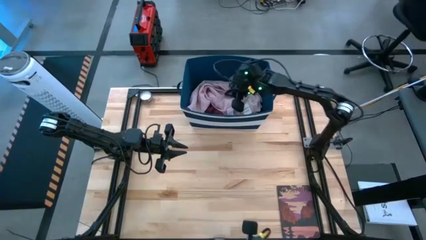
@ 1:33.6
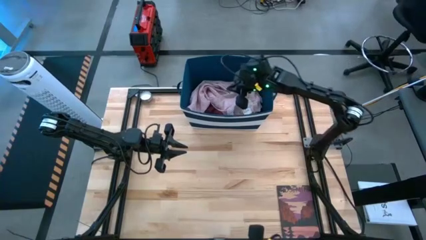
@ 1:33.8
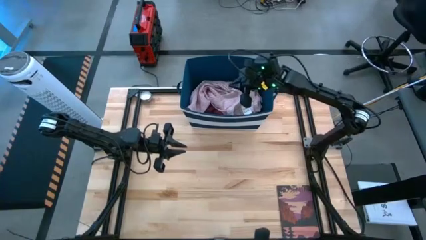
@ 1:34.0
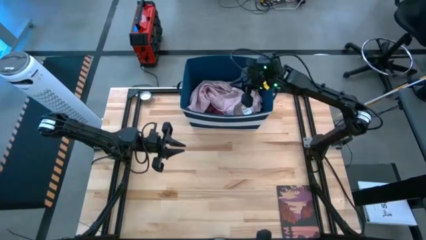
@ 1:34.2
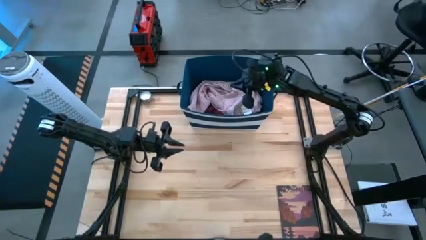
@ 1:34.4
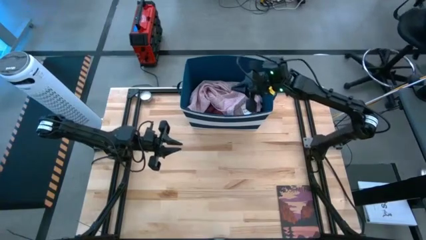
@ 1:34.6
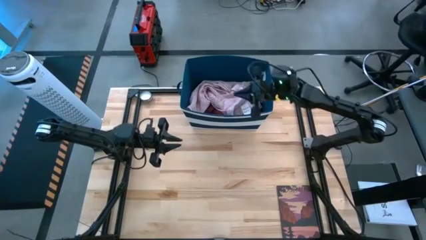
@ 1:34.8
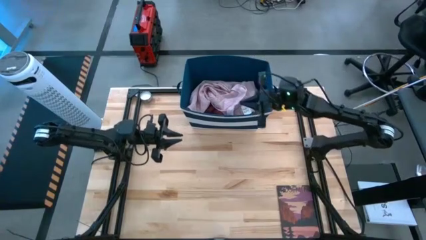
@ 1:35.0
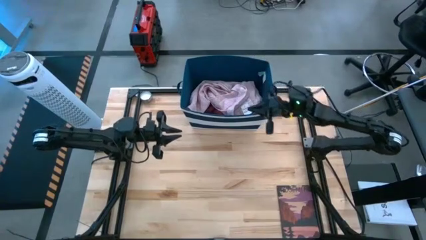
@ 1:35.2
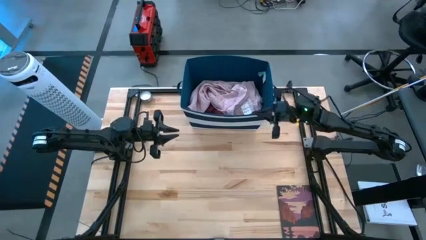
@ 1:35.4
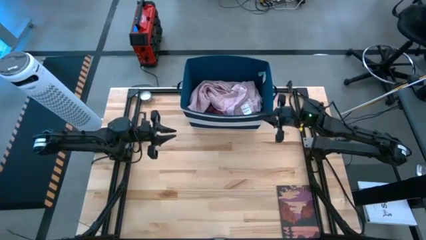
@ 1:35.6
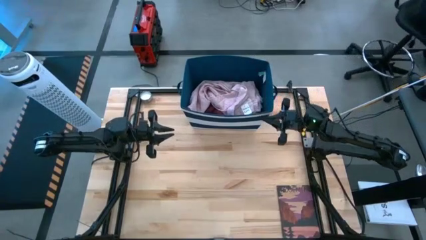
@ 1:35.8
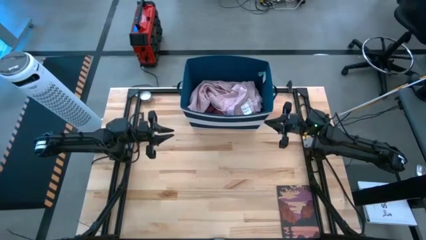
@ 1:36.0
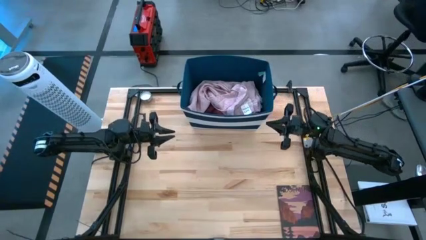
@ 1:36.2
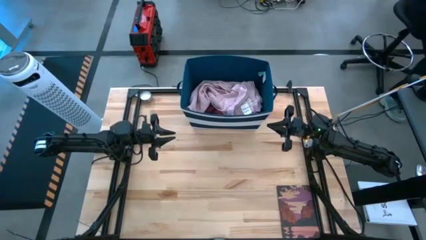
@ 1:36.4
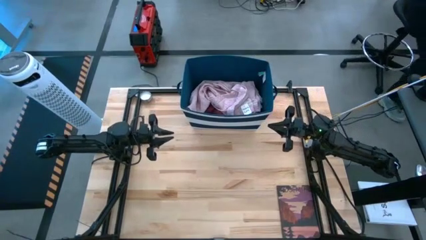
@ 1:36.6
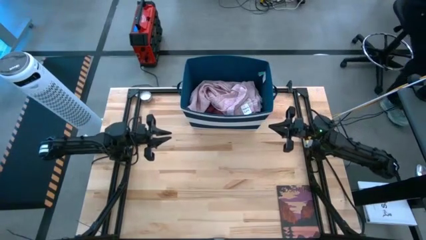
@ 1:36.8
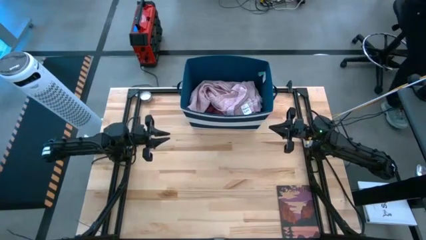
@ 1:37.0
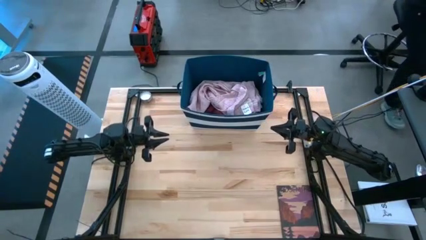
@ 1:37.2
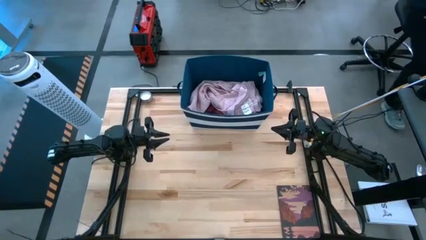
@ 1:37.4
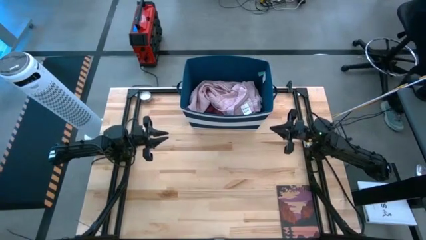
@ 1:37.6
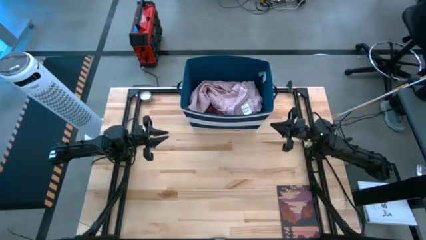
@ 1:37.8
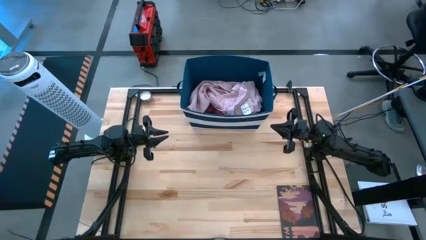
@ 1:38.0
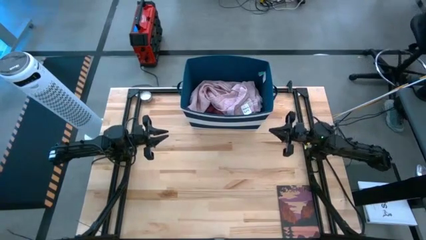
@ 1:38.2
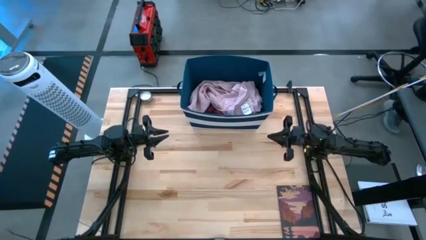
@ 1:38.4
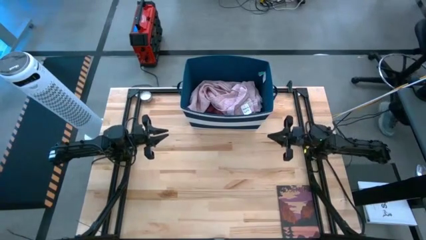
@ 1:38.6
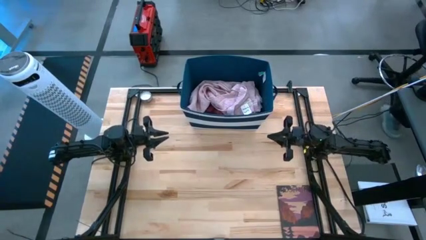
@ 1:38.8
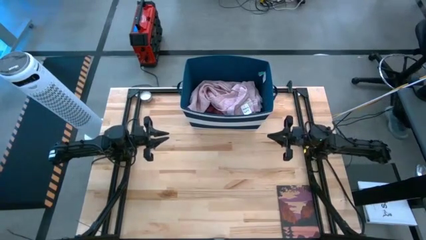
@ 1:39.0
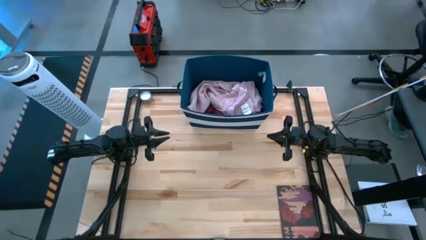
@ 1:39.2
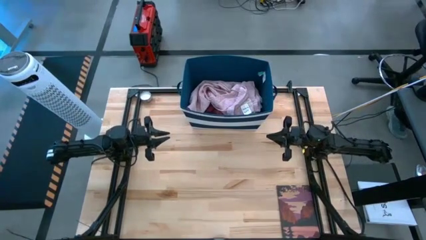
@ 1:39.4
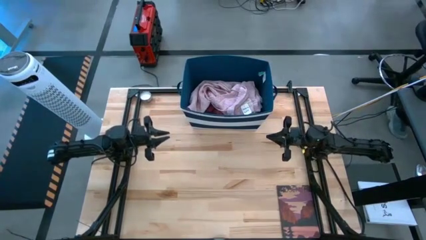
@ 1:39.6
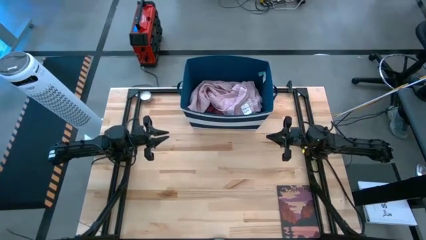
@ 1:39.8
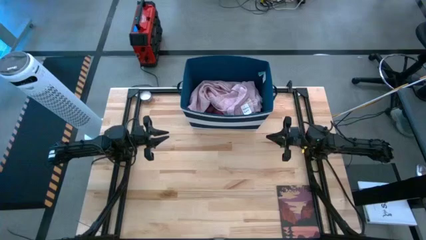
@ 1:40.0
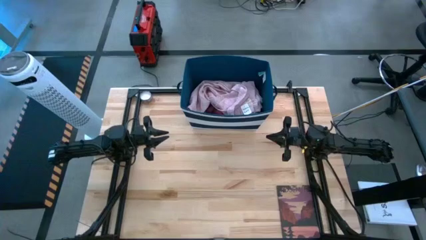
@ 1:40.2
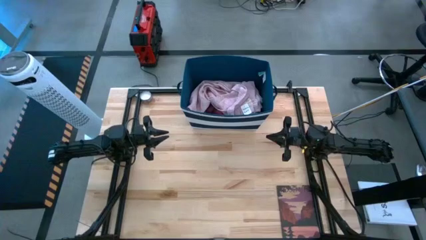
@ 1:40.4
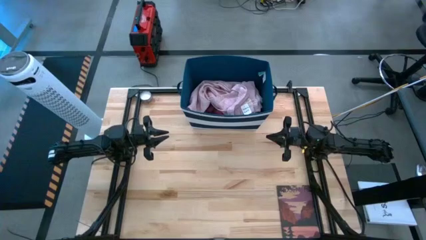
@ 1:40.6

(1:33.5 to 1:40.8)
Task: Sort clothes
Return to Home Position

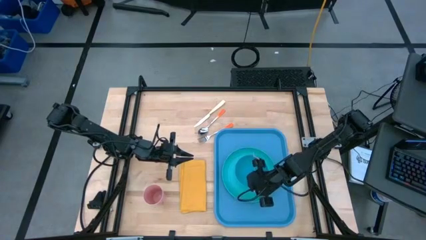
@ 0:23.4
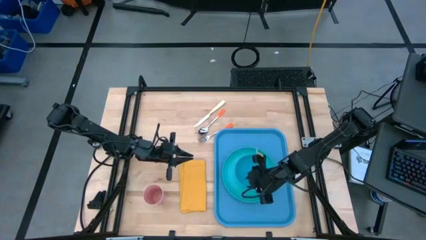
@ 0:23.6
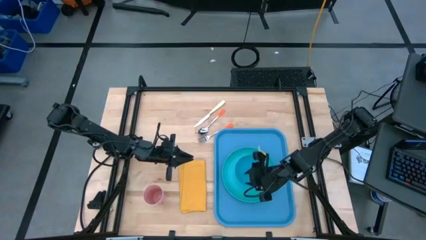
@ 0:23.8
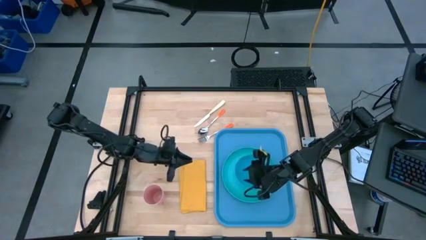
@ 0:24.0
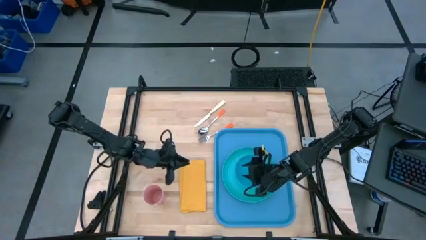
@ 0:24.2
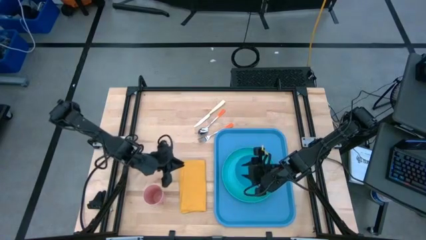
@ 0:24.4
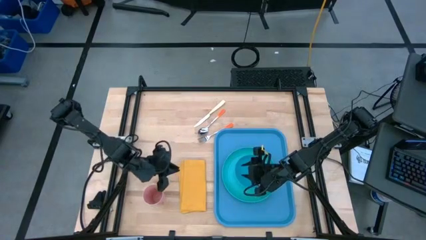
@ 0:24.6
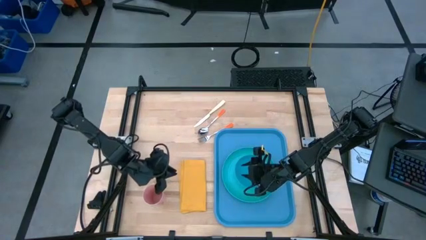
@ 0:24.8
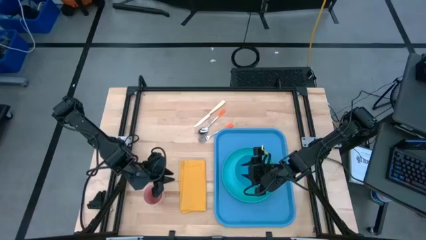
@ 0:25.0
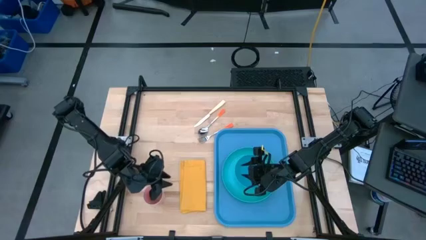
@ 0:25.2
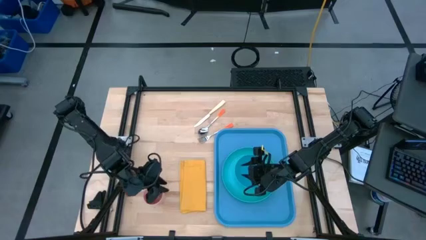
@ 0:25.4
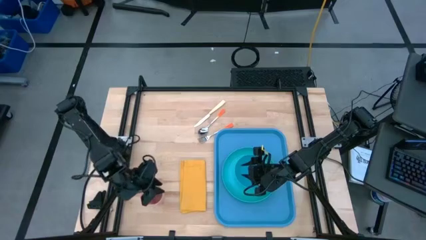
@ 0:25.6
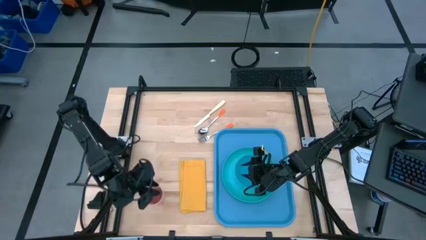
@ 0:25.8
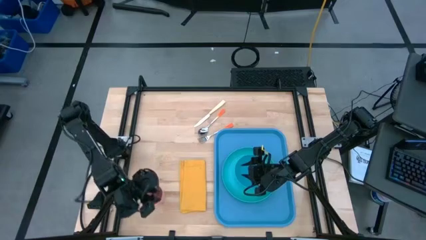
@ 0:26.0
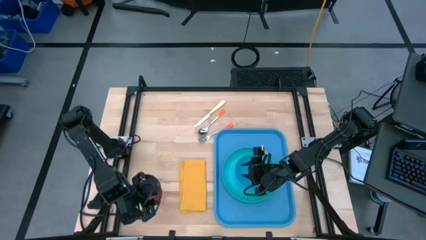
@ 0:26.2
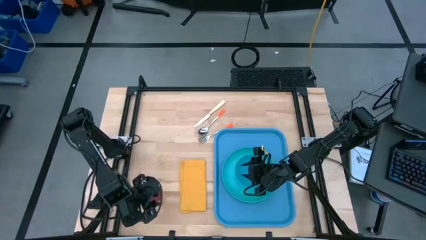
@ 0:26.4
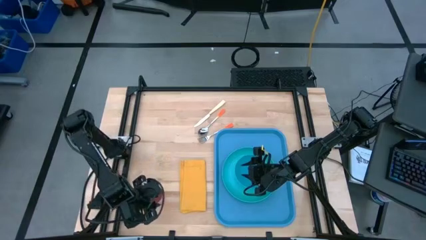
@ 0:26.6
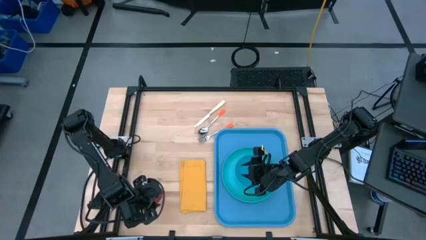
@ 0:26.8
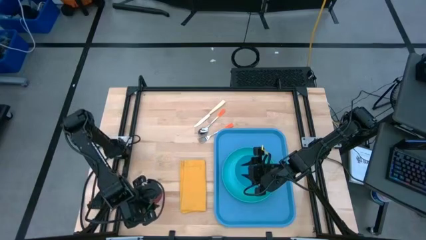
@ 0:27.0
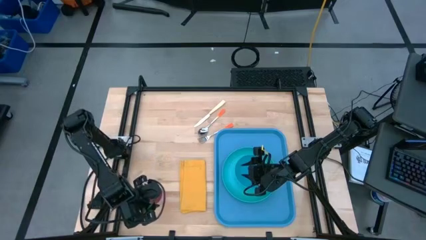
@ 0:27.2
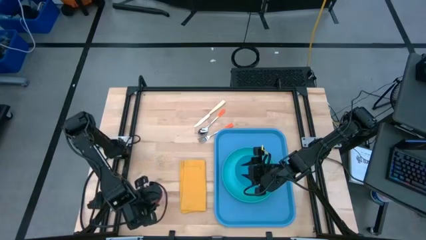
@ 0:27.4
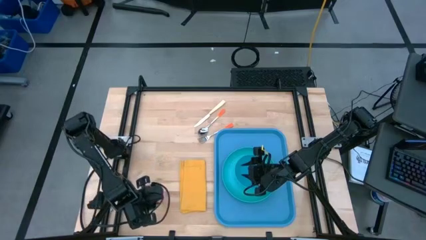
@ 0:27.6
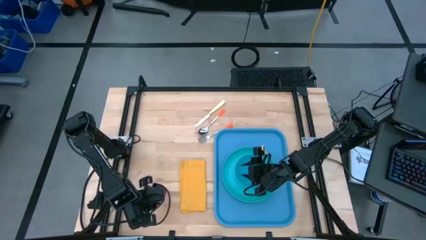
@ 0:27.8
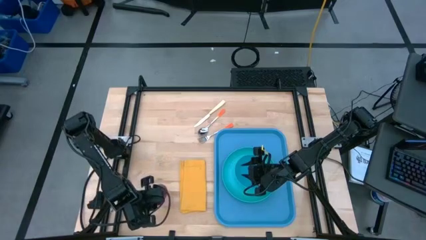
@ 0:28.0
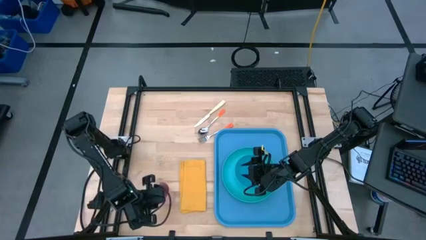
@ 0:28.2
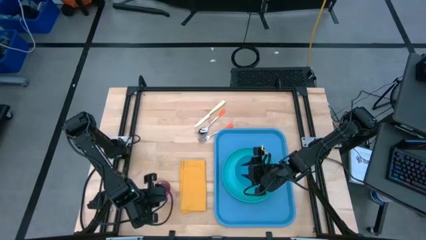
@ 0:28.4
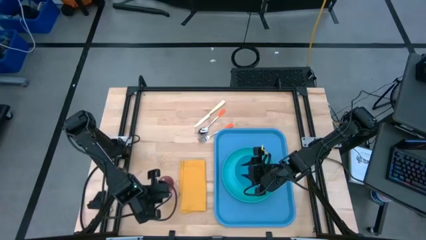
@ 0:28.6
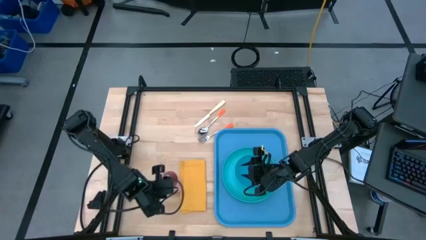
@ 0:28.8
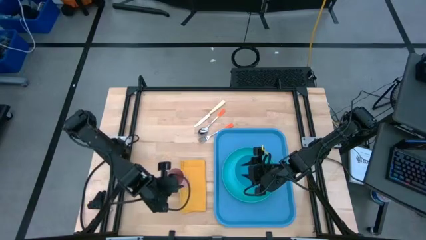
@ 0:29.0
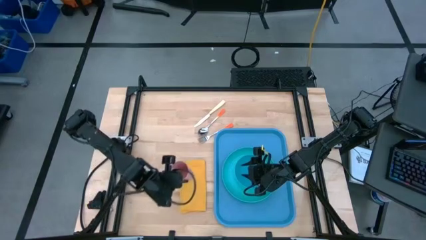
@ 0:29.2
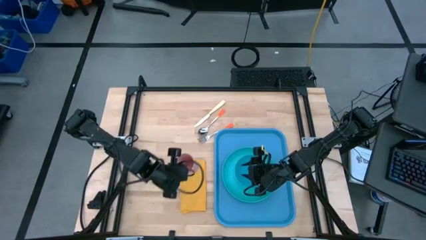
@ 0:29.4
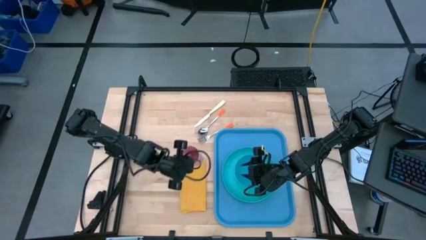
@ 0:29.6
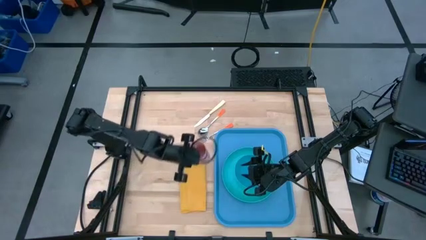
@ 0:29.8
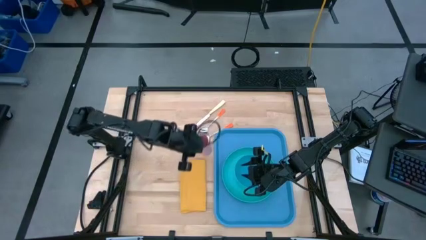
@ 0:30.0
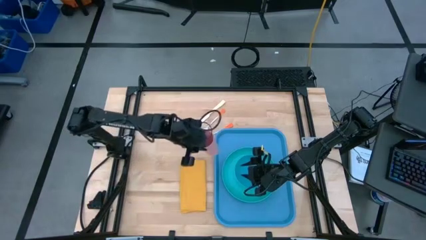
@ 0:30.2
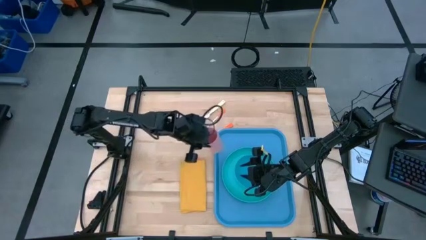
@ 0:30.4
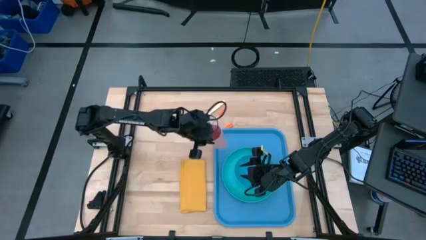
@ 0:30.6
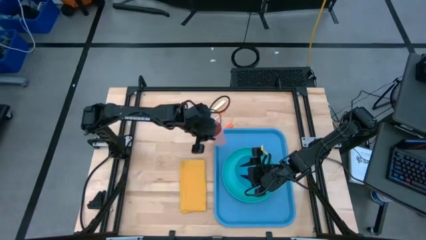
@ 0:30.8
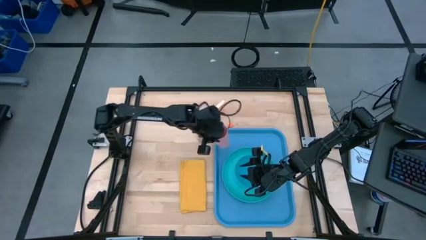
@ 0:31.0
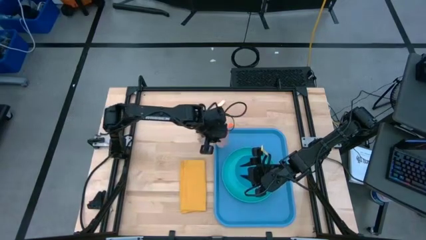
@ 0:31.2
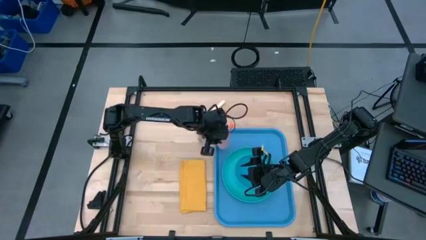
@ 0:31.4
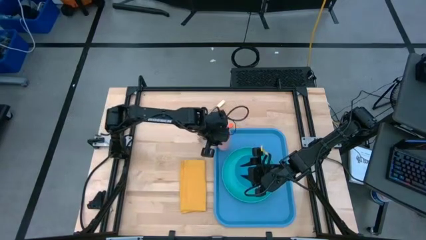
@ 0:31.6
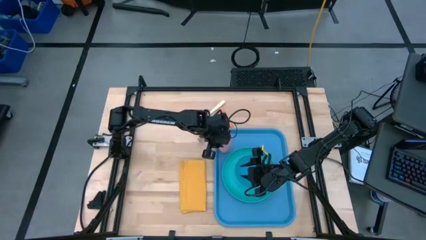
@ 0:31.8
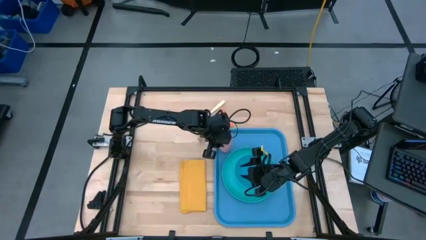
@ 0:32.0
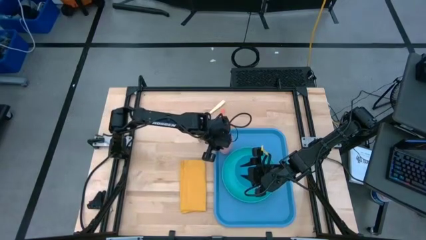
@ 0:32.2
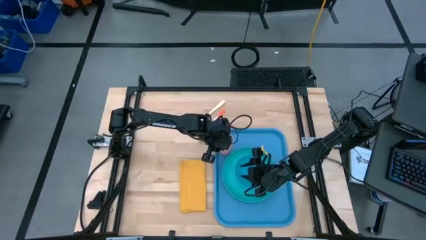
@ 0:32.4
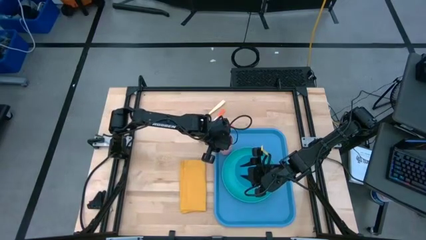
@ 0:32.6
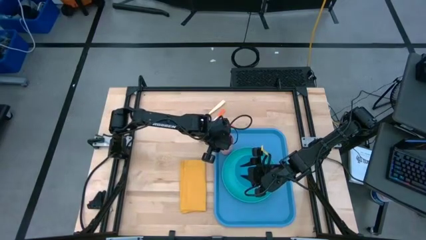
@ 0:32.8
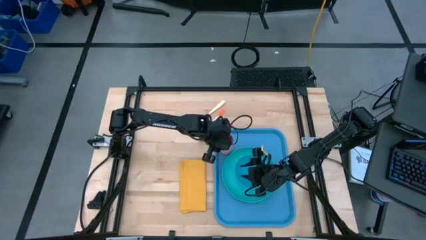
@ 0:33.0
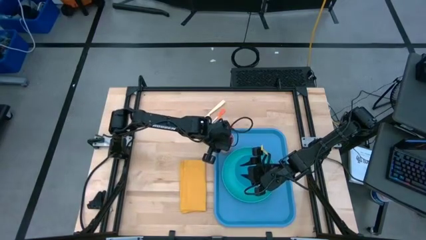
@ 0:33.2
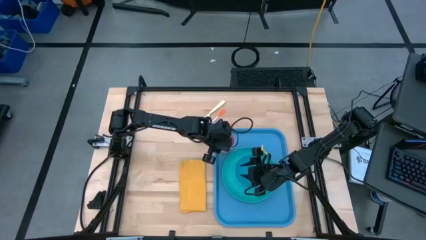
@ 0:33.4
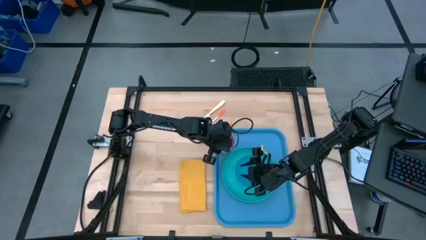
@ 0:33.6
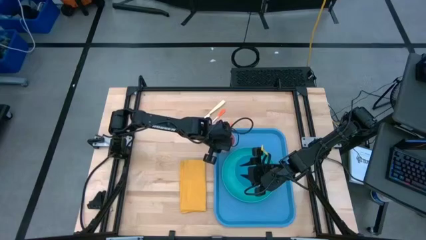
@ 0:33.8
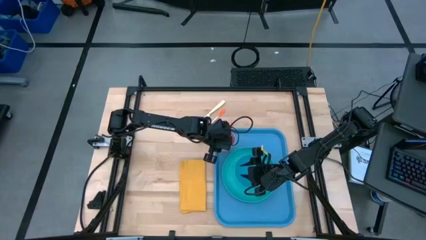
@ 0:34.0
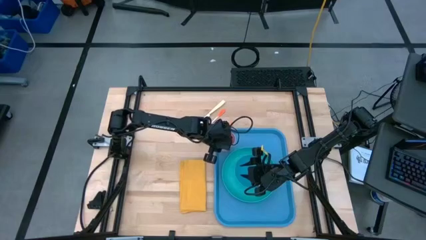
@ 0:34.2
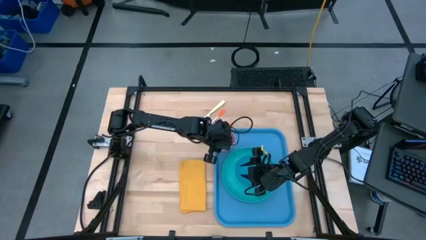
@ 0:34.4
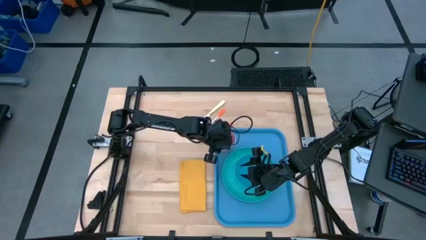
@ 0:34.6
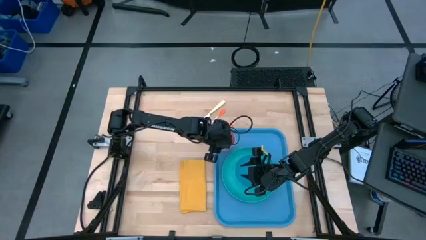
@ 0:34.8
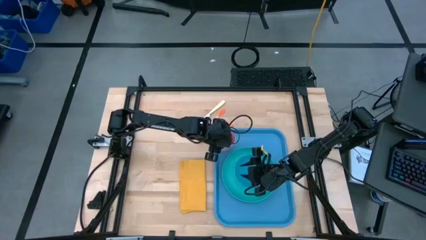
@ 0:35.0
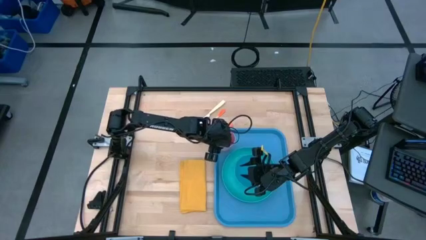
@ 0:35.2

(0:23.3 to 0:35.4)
Task: Set up tray
Put the pink cup on the blue tray to the top right of the light blue plate
